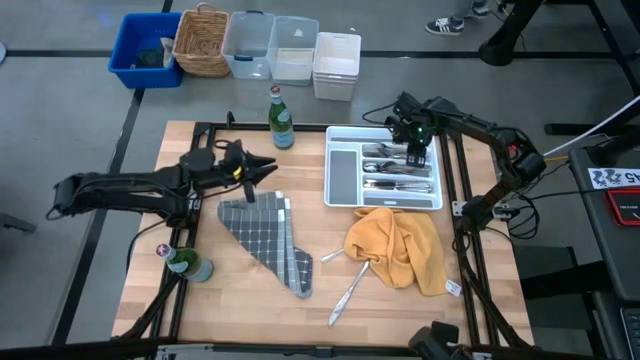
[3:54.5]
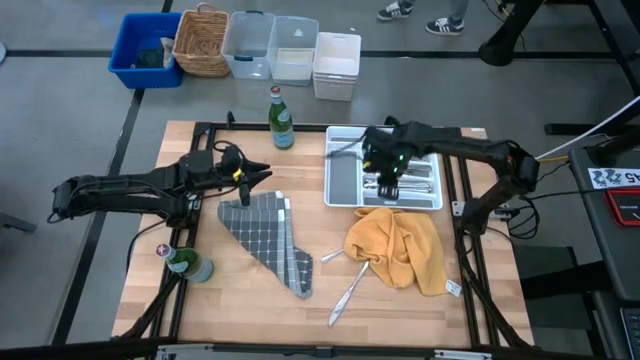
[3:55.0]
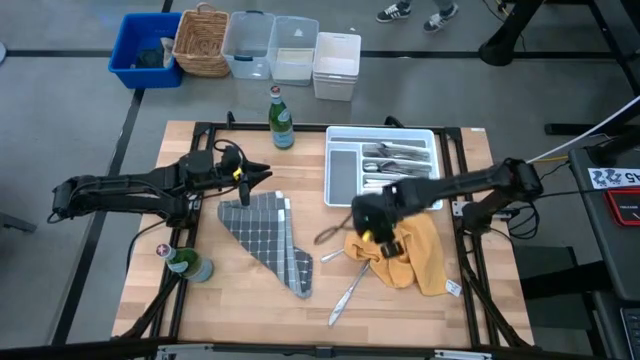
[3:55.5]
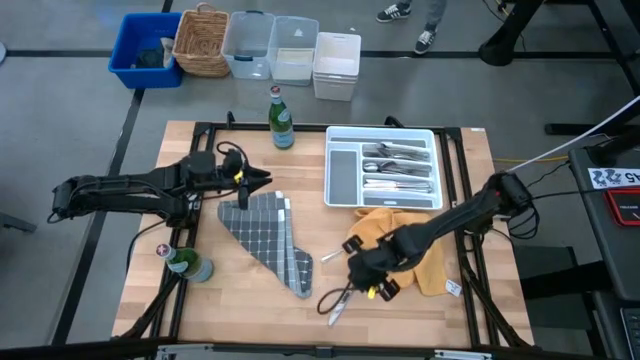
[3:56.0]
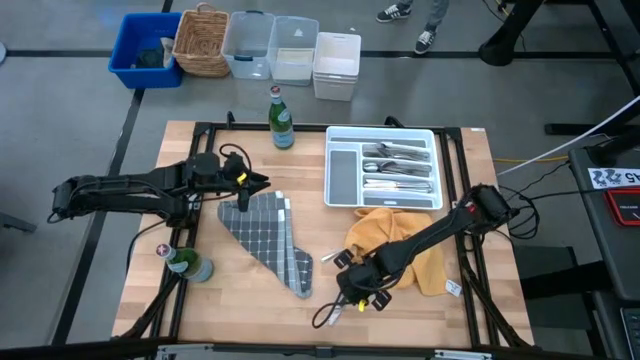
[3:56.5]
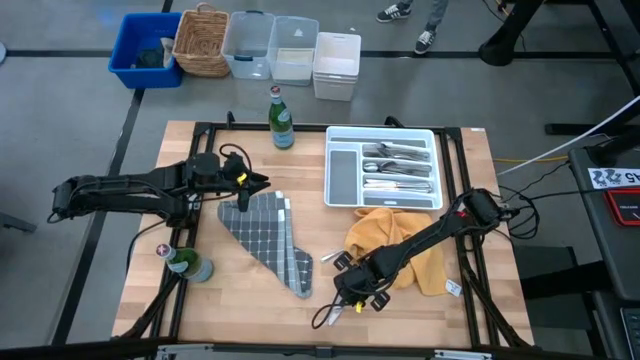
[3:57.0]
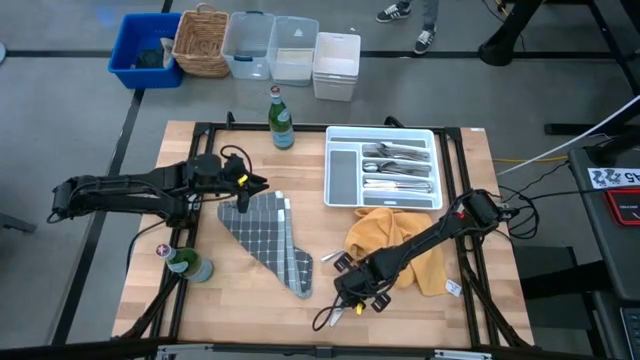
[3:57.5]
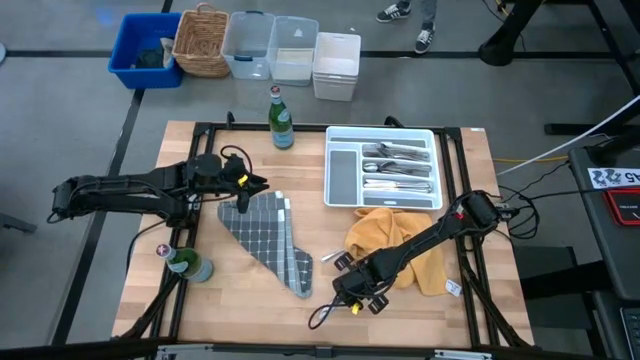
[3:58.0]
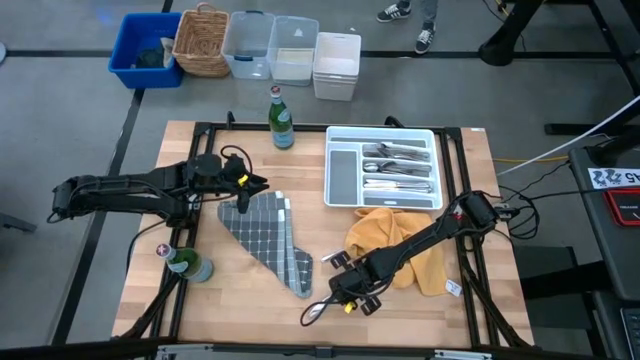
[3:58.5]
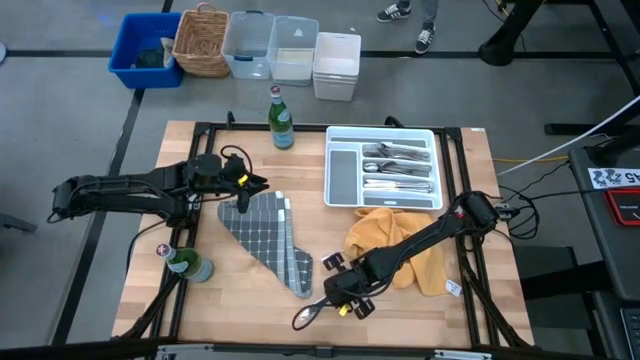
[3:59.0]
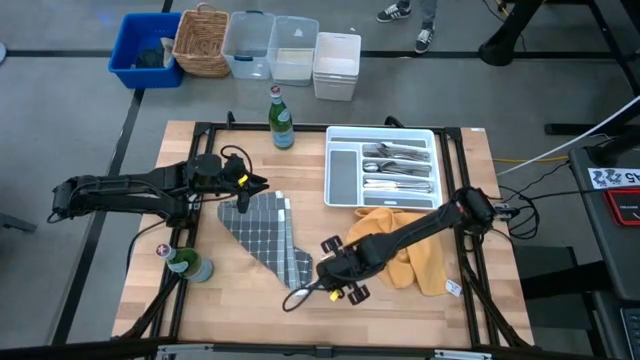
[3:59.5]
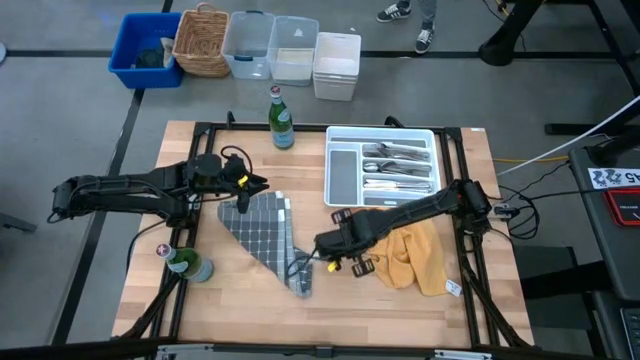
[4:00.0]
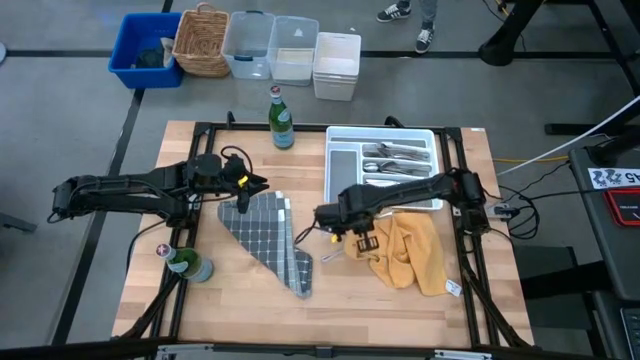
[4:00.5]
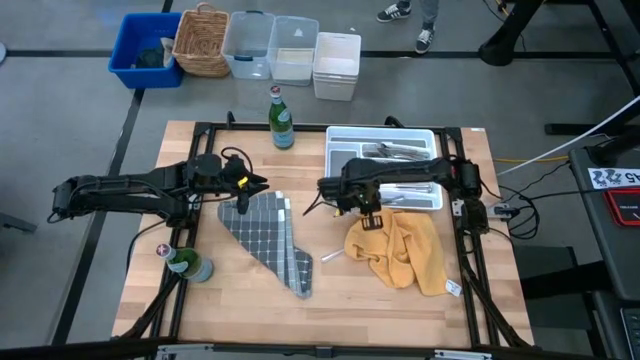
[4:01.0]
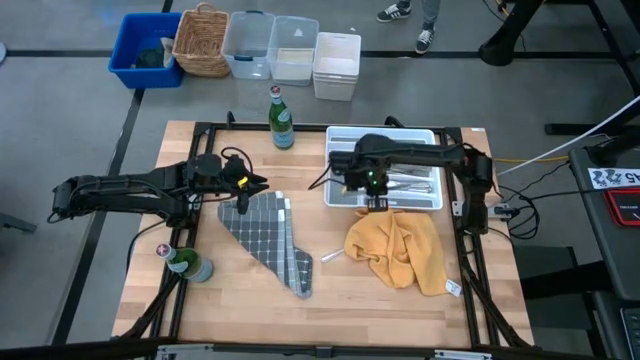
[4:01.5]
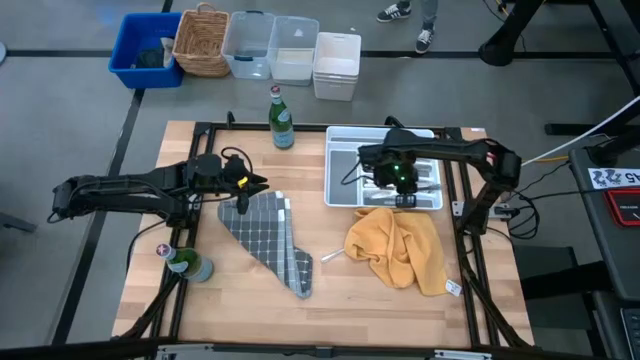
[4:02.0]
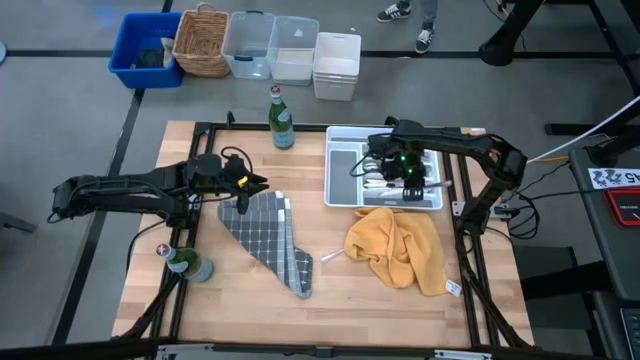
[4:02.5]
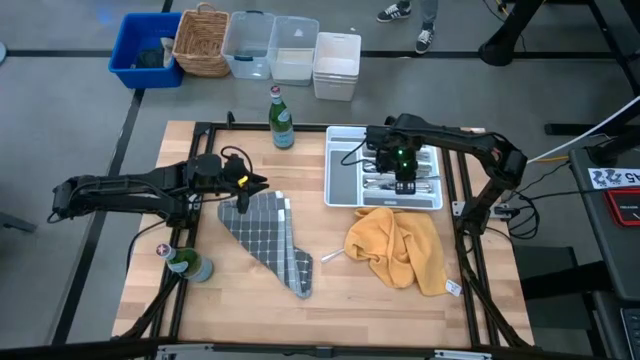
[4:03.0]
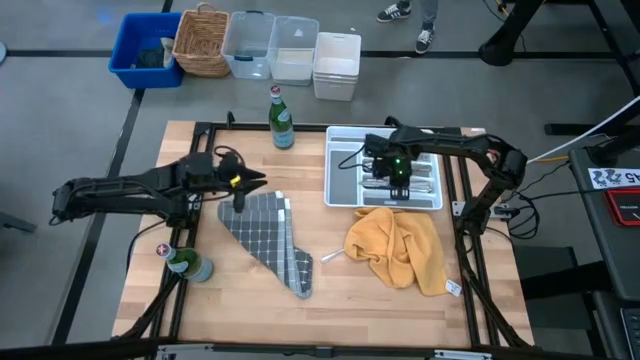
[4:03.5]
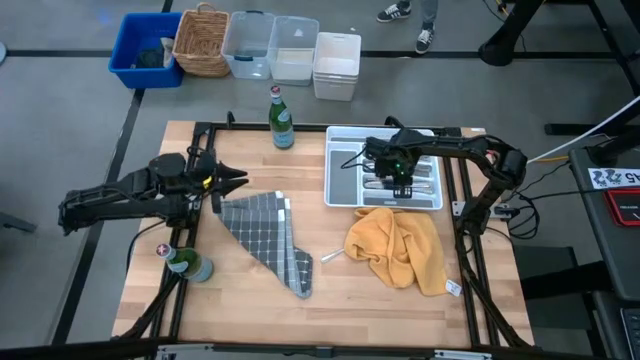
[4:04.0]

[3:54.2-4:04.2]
Put the silver knife into the cutlery tray

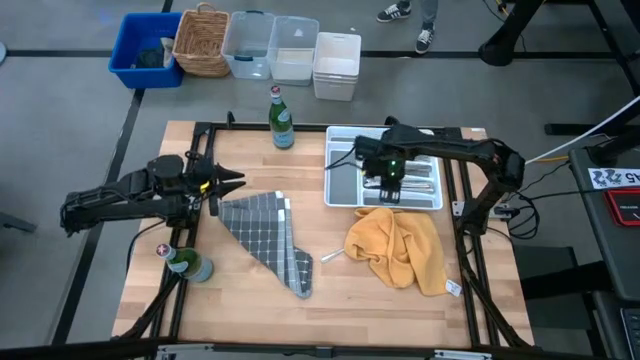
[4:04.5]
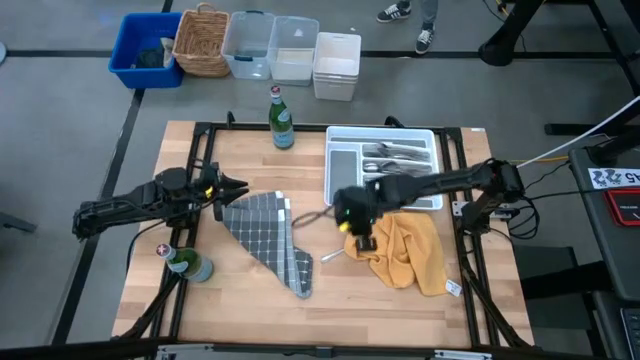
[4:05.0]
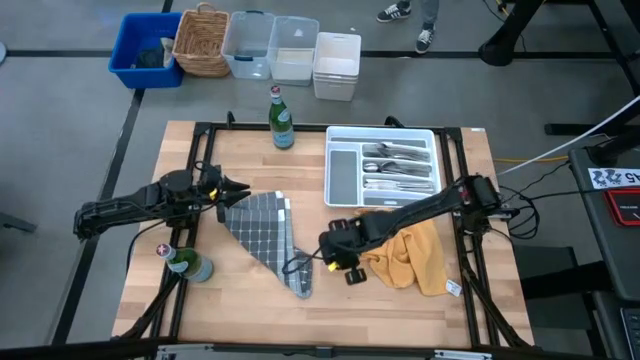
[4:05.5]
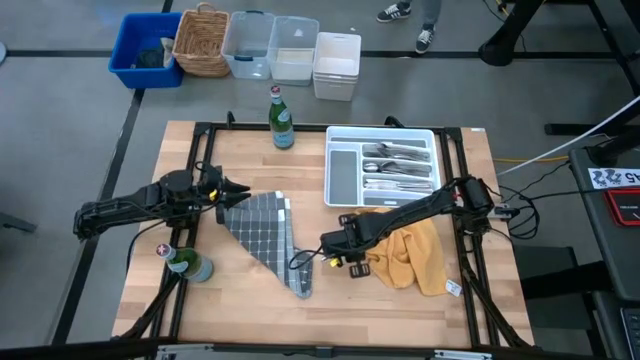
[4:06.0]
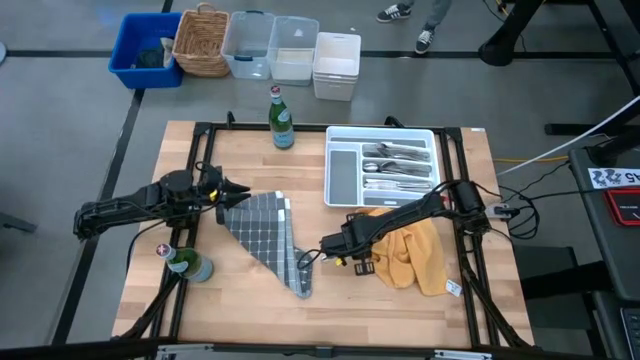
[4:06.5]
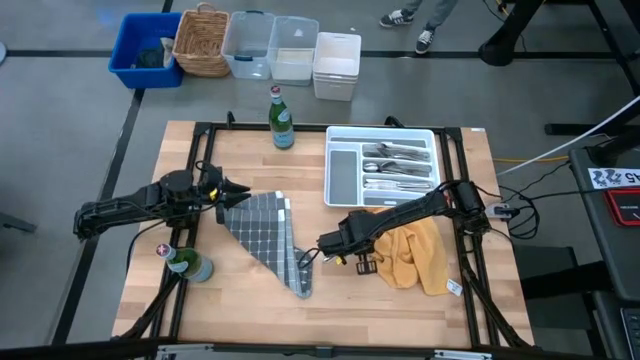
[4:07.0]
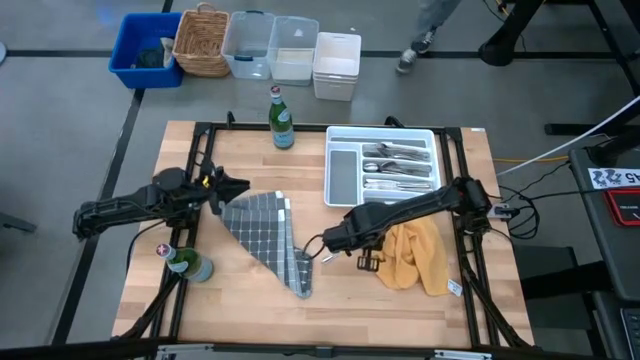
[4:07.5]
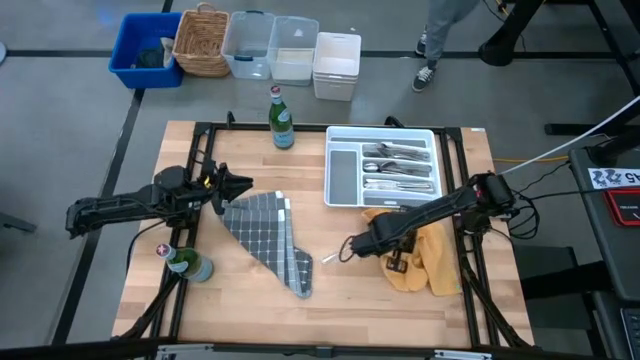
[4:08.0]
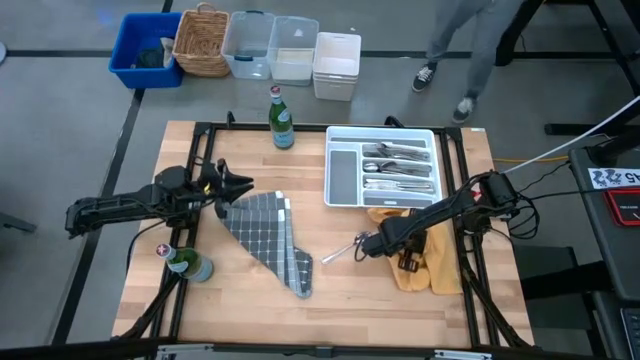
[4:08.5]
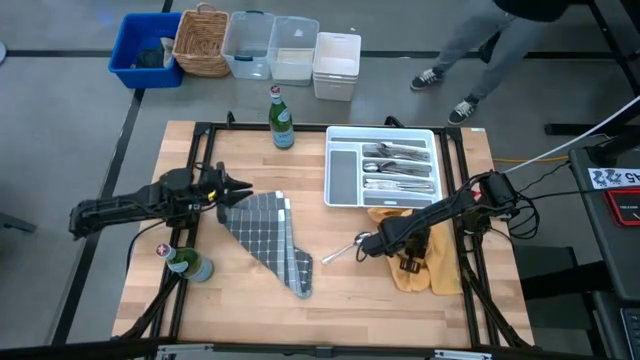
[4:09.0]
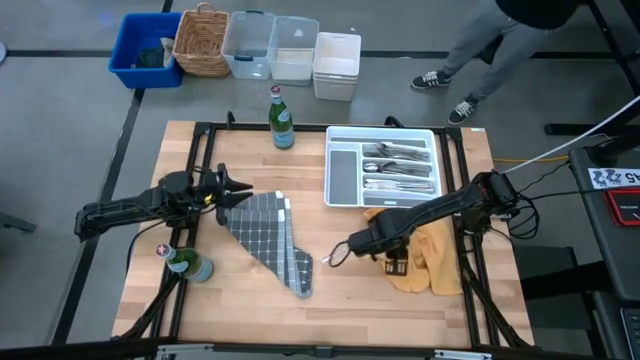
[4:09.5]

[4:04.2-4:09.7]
Remove the yellow towel from the silver spoon
